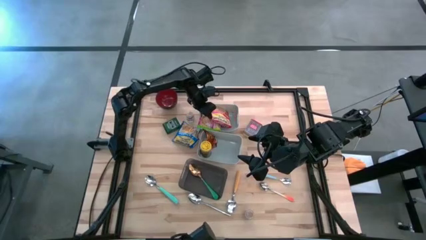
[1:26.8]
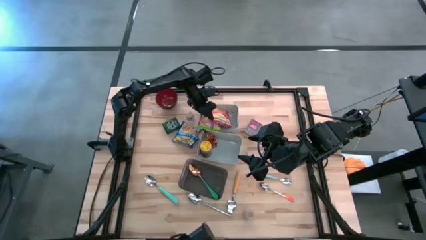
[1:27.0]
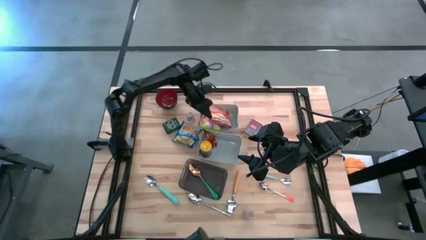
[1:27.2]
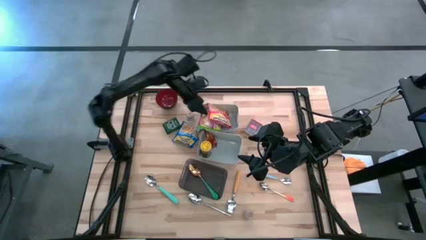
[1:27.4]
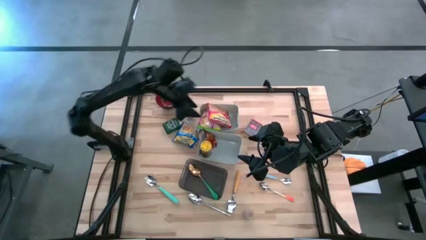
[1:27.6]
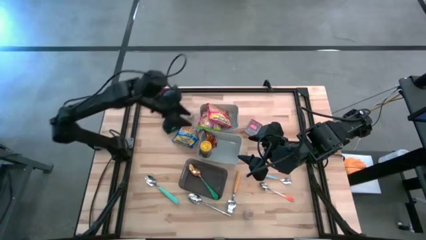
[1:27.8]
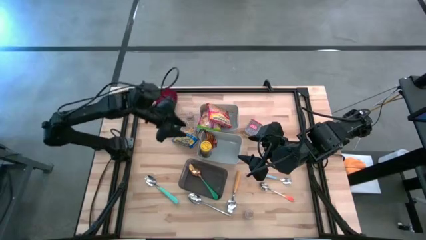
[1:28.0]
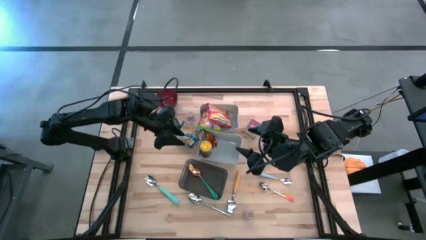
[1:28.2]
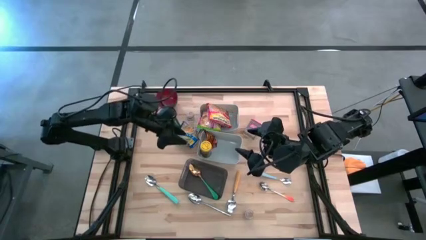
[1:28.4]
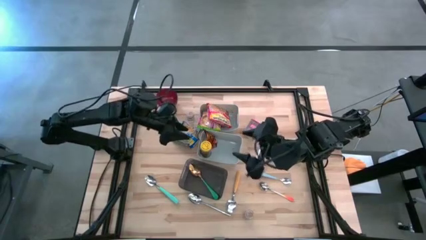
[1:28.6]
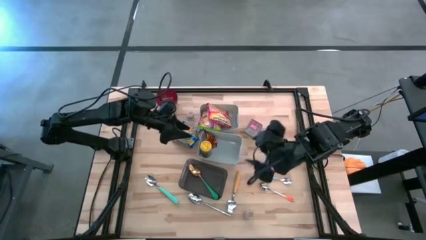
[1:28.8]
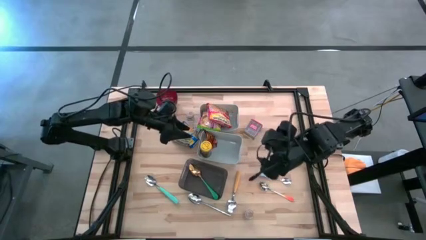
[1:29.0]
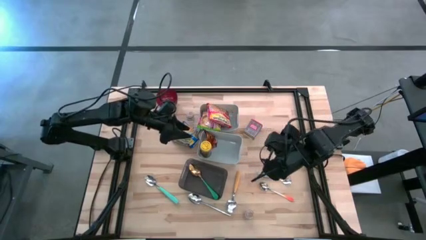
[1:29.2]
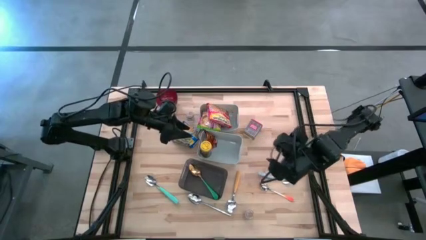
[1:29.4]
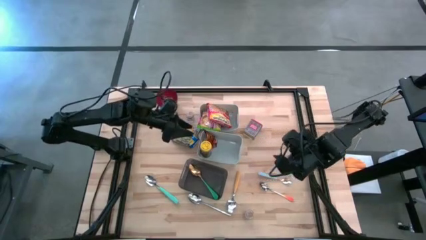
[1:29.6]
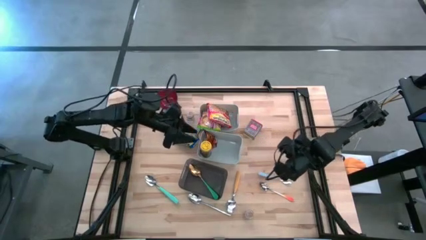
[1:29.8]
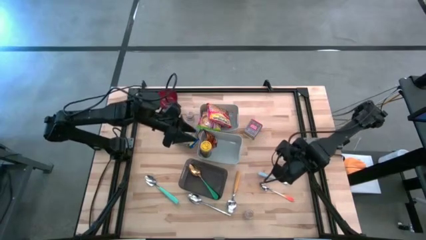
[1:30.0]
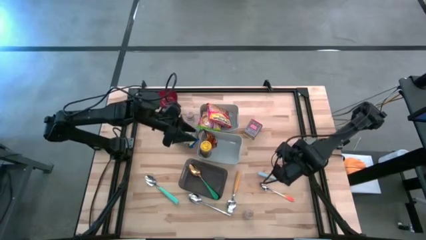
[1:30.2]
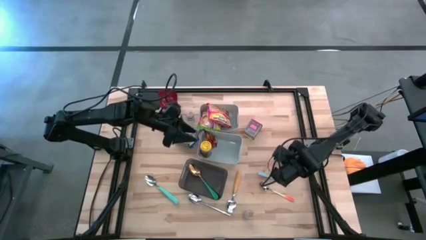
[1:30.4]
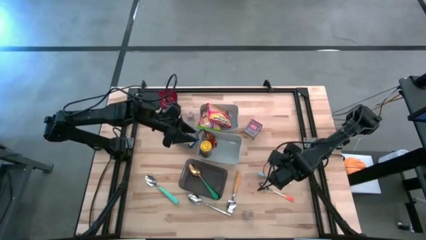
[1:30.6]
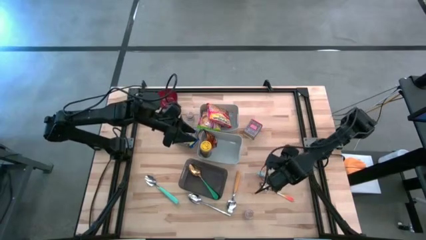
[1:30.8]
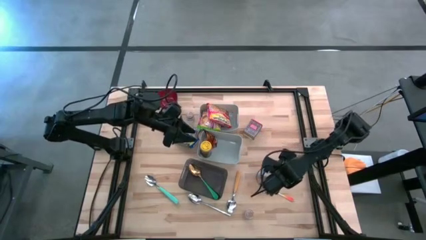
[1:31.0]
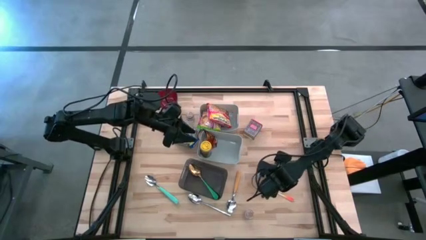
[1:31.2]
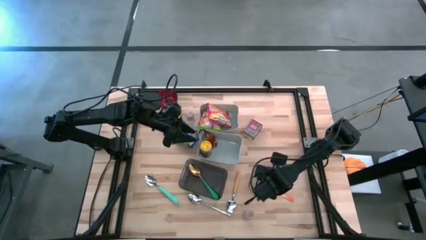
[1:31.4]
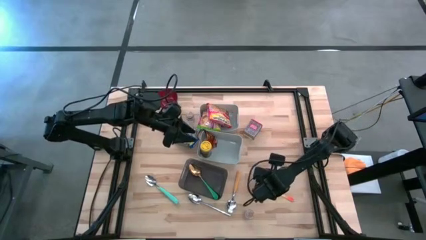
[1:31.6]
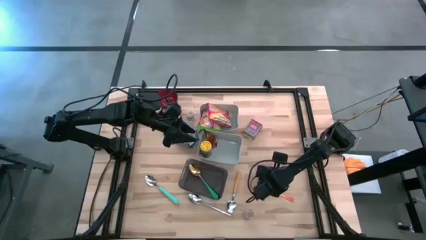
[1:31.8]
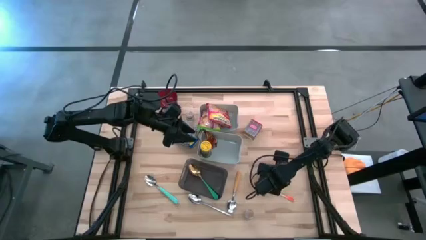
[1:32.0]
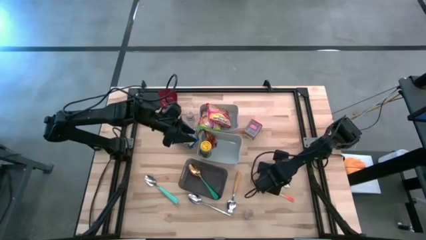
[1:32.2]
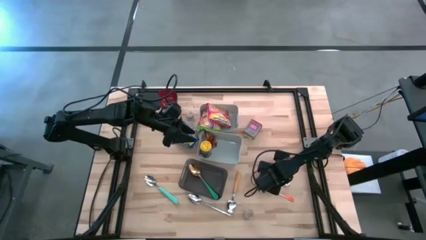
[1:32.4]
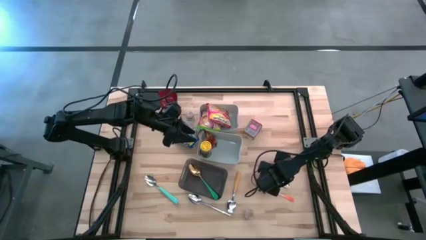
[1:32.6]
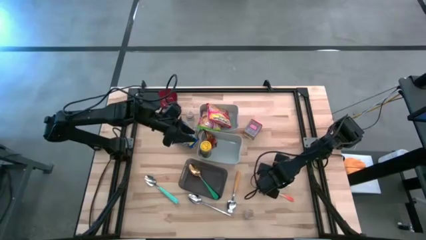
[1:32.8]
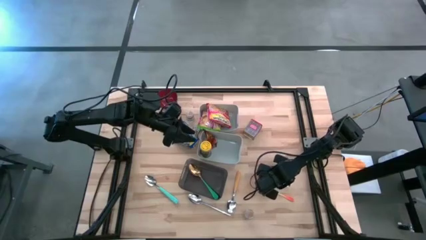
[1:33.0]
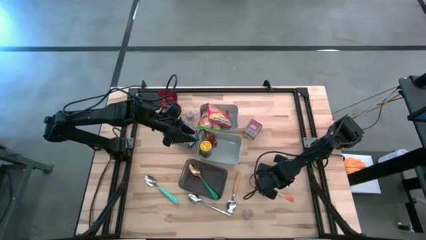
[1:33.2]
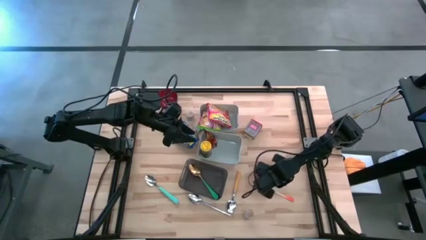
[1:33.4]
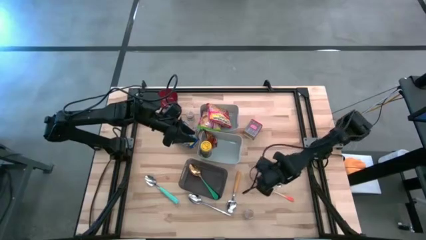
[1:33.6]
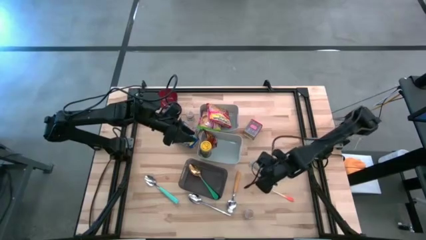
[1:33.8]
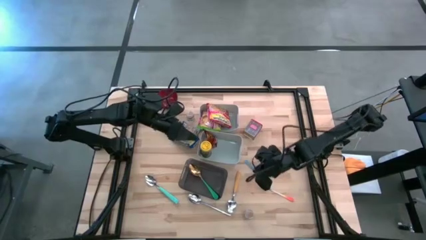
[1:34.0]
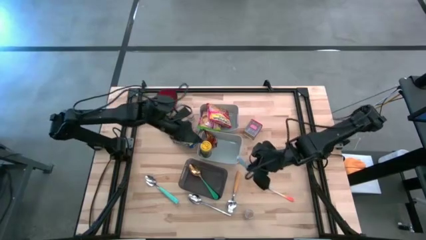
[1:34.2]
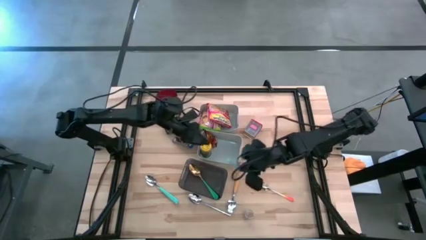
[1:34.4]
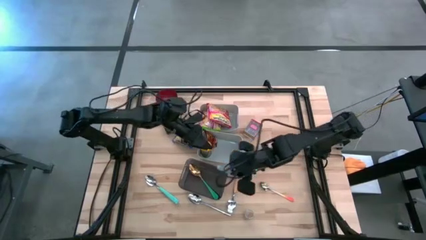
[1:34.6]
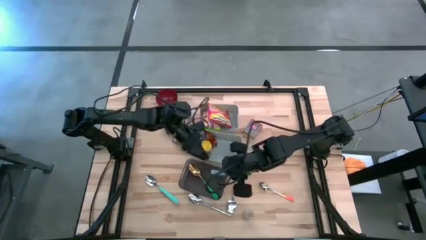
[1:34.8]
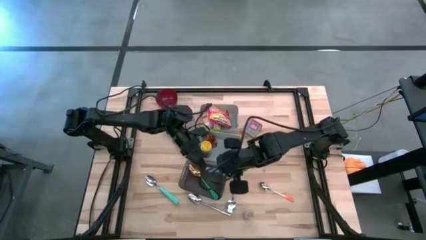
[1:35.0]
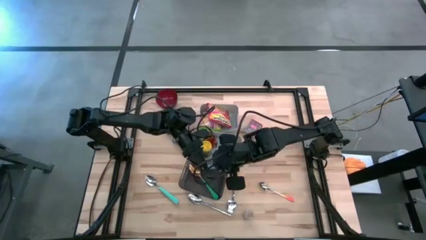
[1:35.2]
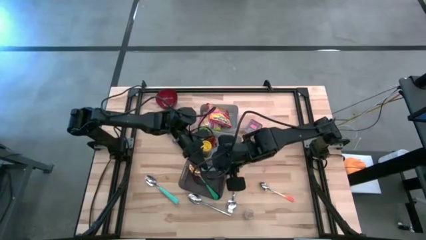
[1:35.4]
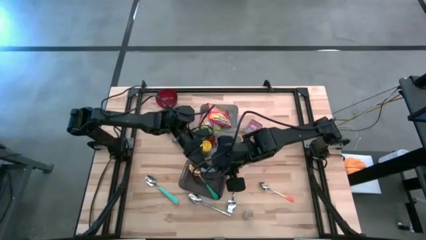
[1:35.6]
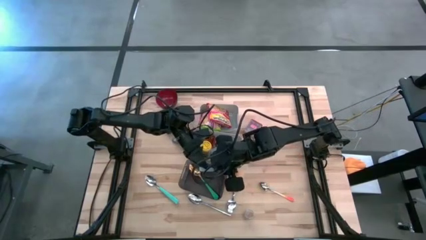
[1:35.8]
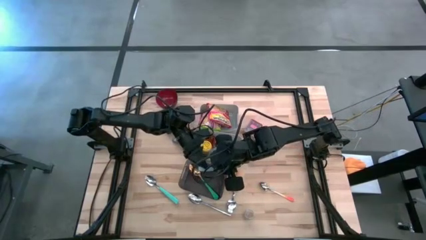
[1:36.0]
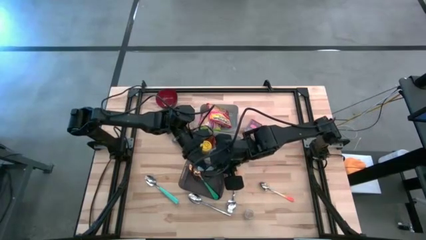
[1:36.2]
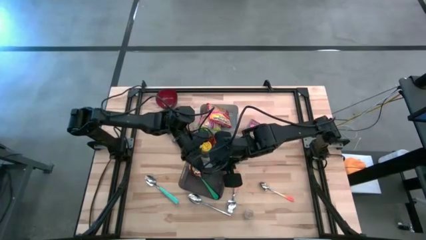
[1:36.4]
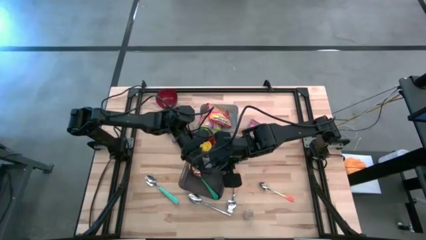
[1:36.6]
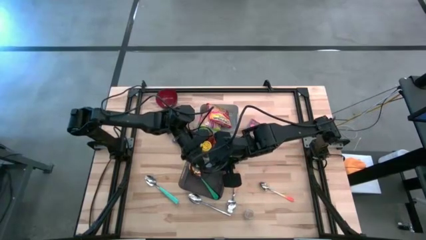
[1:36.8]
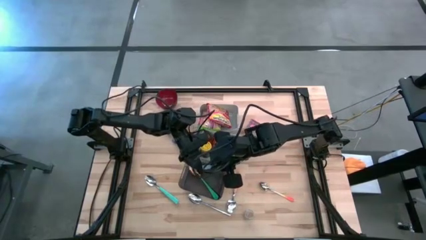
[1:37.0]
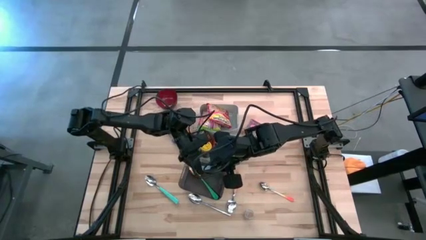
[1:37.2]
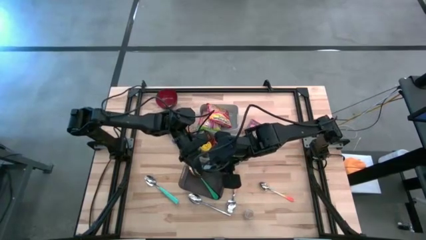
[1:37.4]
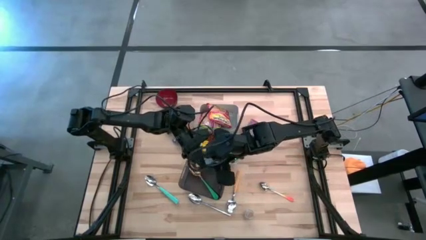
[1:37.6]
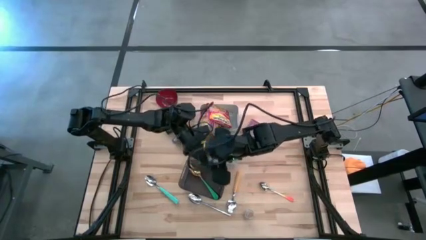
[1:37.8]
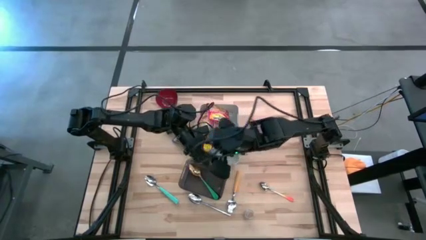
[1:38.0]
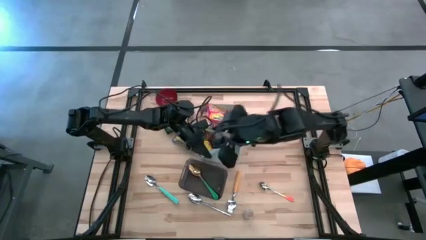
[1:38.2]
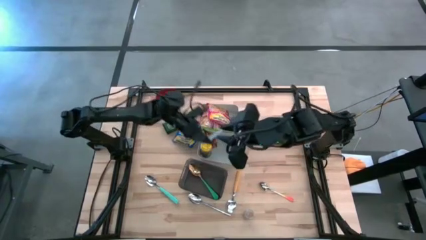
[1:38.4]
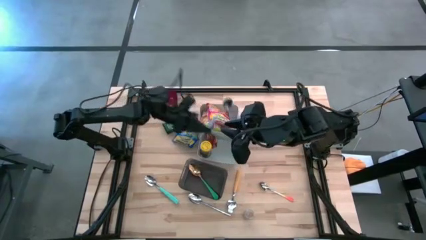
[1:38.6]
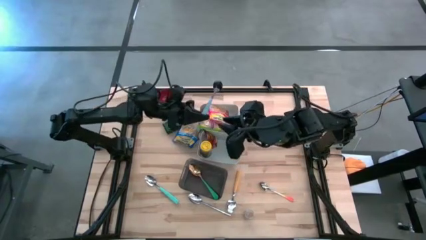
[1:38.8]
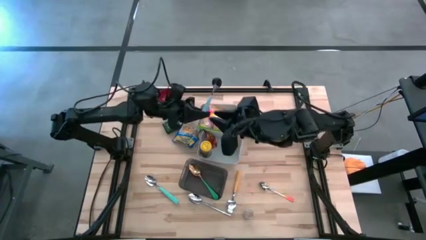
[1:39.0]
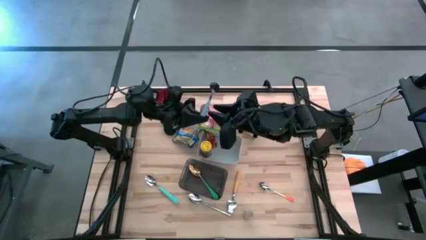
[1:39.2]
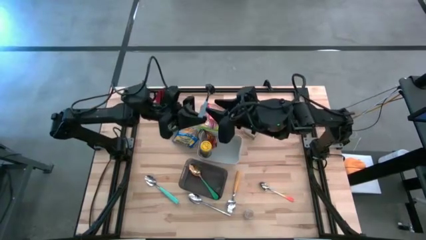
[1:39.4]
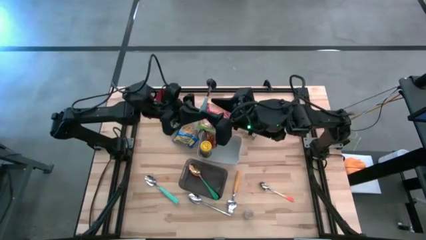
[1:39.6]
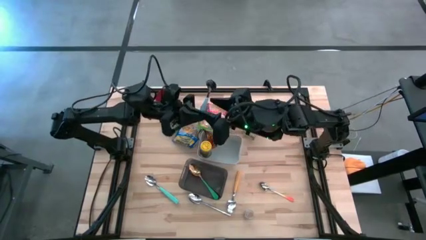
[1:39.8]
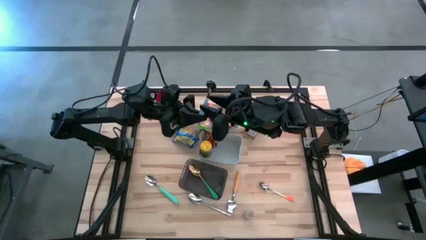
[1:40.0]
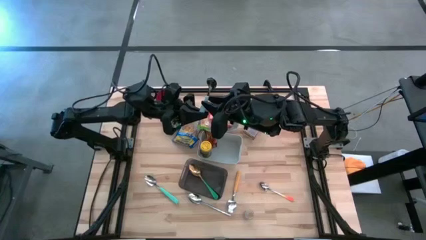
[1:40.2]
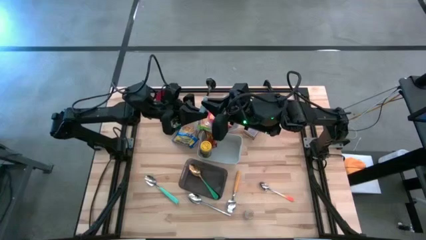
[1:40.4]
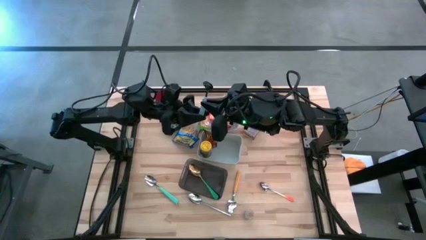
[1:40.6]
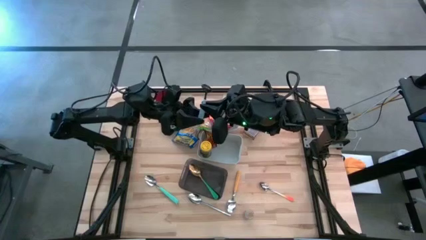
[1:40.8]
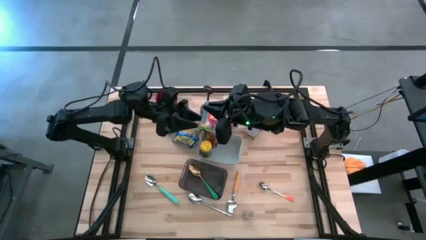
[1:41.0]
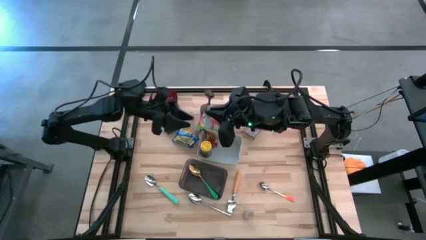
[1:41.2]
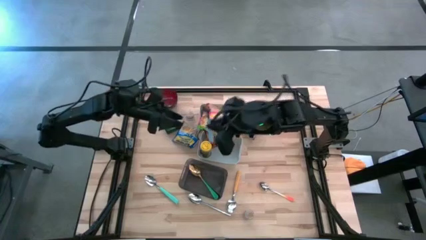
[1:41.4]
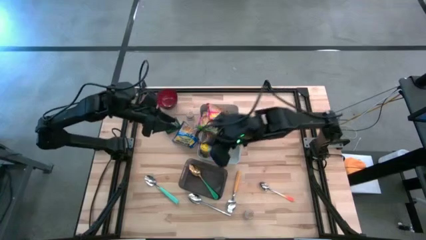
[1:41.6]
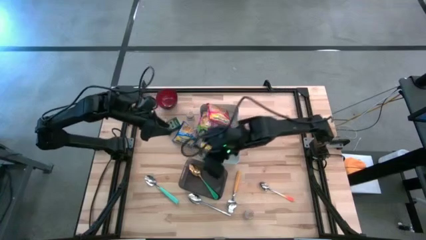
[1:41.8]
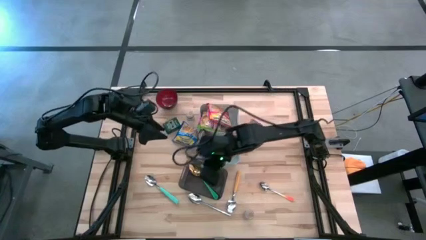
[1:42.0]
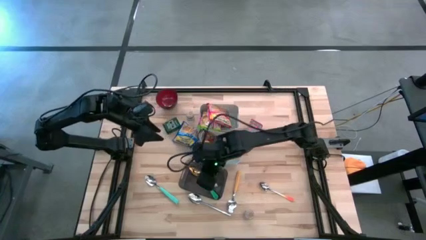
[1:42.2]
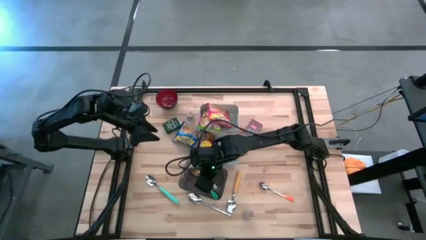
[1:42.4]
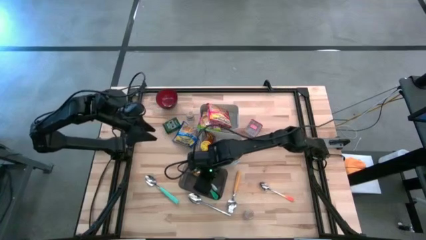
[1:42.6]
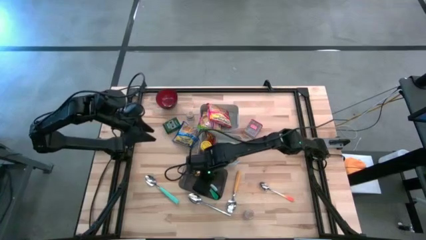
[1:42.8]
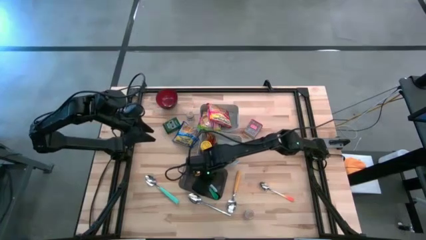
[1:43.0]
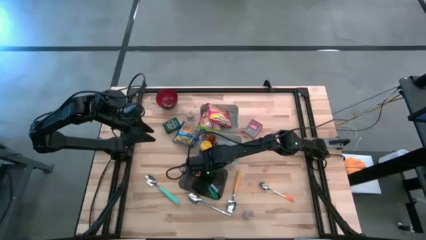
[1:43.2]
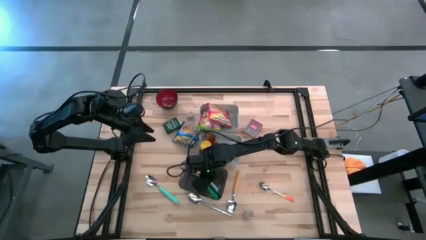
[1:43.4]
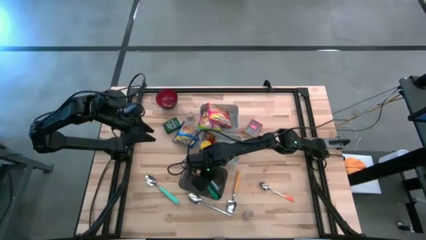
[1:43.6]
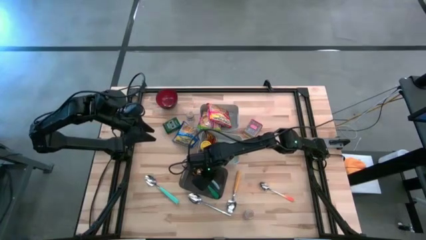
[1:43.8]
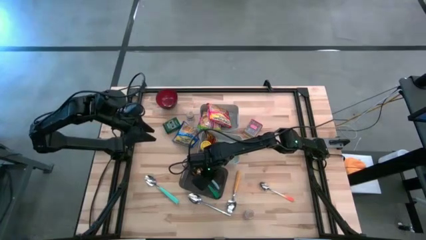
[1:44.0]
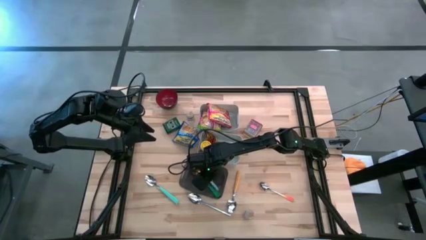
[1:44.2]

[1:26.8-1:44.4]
Put the blue spoon into the black bin
